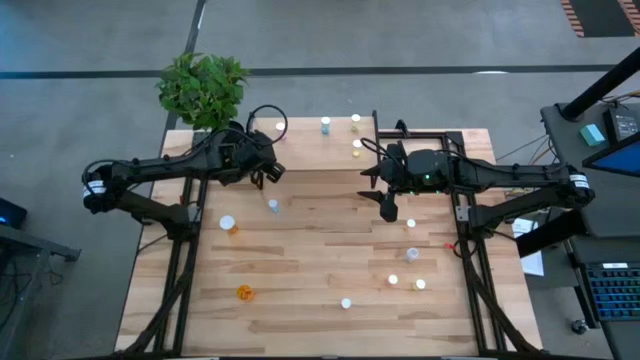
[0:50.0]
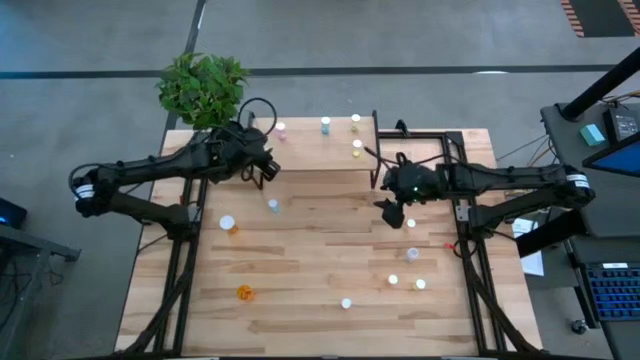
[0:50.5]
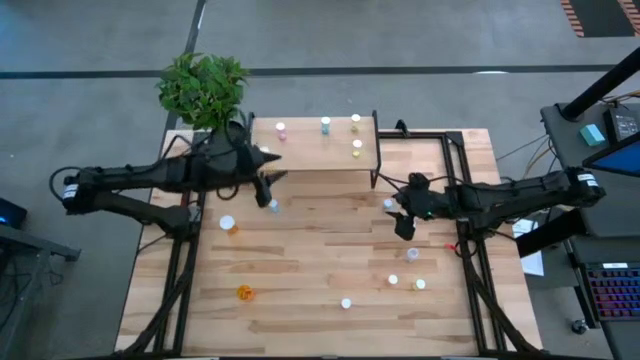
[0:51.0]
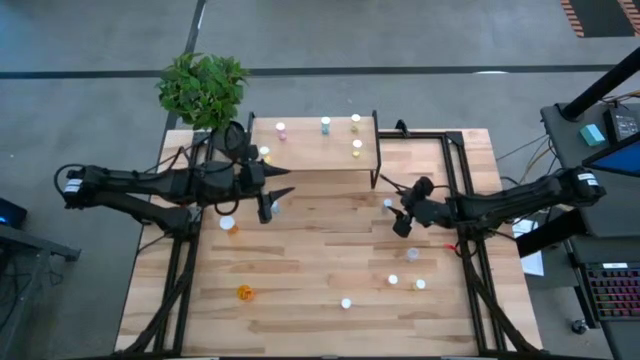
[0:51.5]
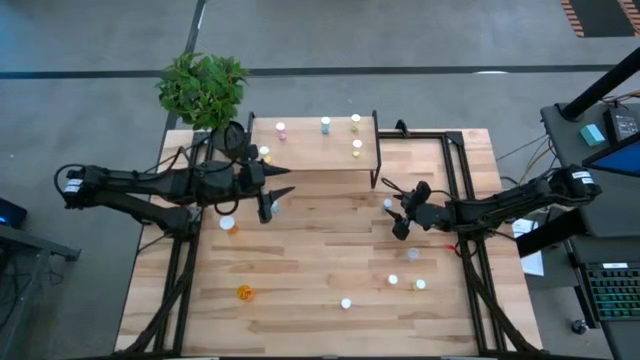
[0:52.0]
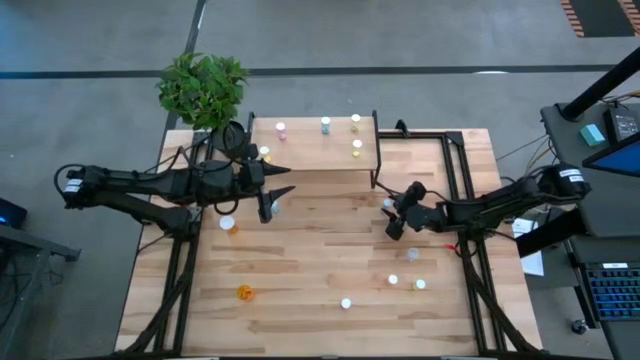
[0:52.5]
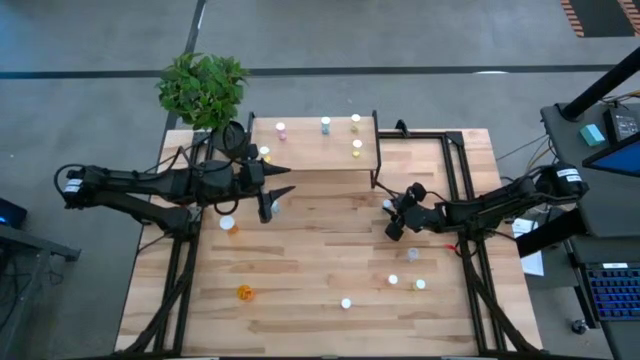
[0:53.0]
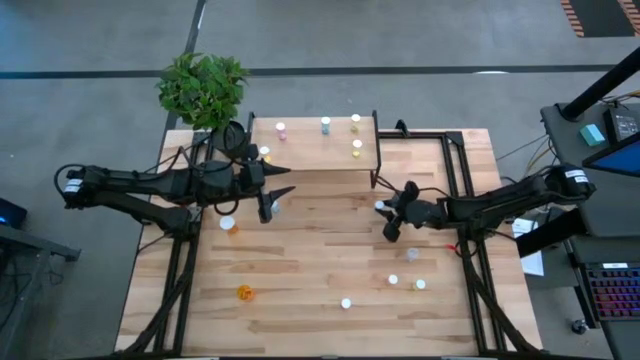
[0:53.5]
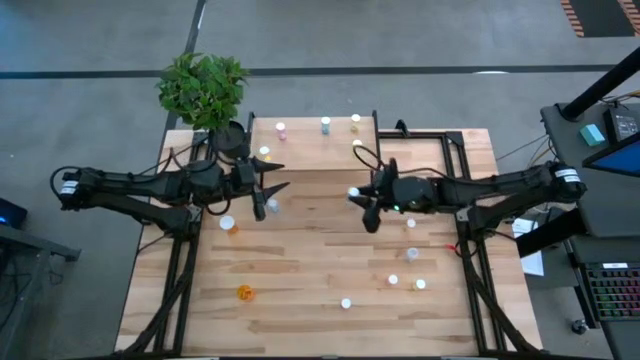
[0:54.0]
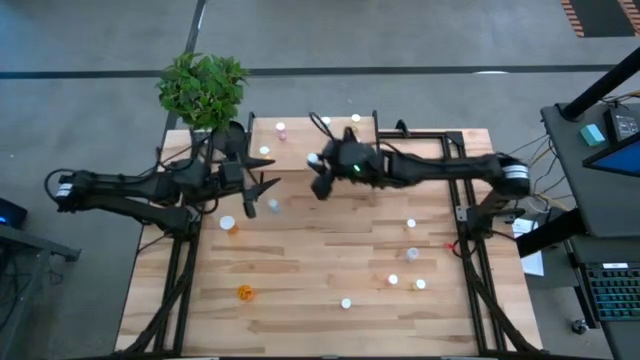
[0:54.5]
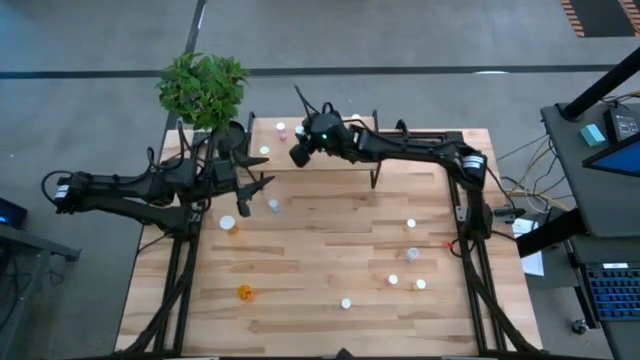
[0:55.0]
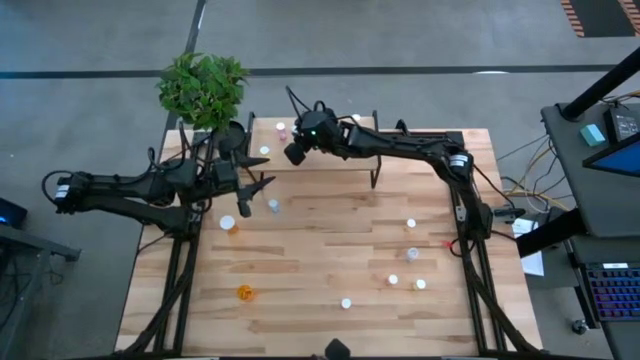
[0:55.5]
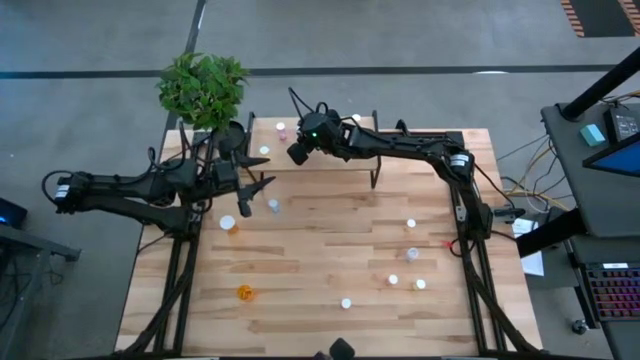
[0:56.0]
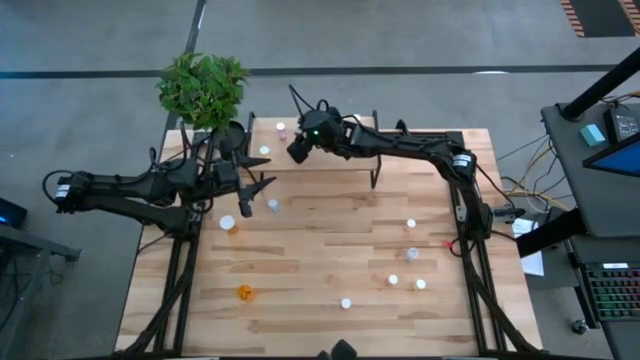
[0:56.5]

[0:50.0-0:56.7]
Task: Pick and place medicine bottles onto shelf by color
Put the blue pill bottle on the shelf

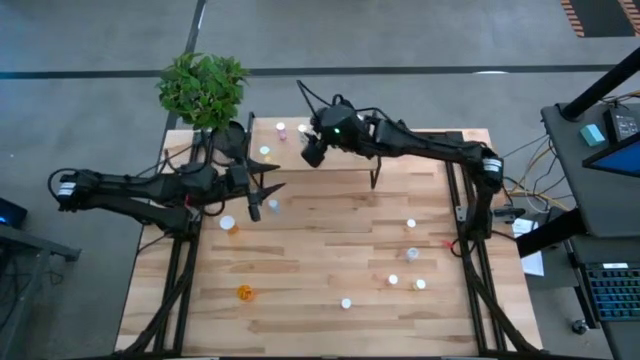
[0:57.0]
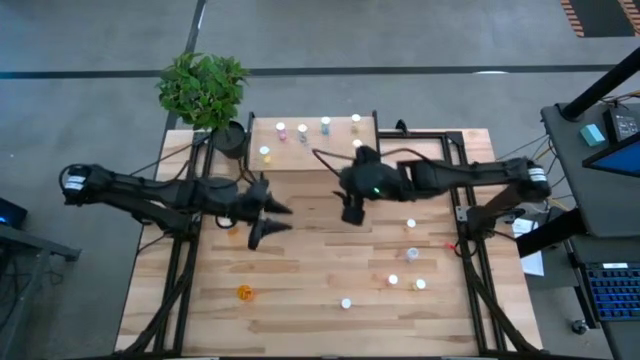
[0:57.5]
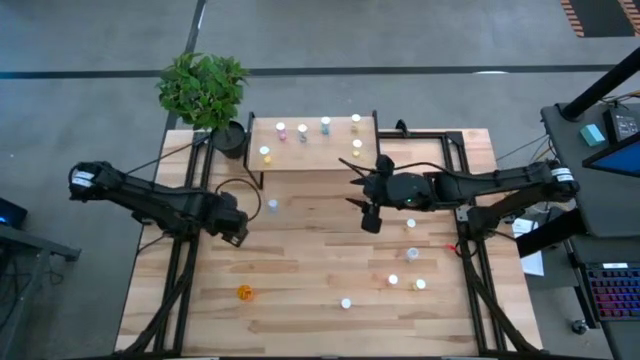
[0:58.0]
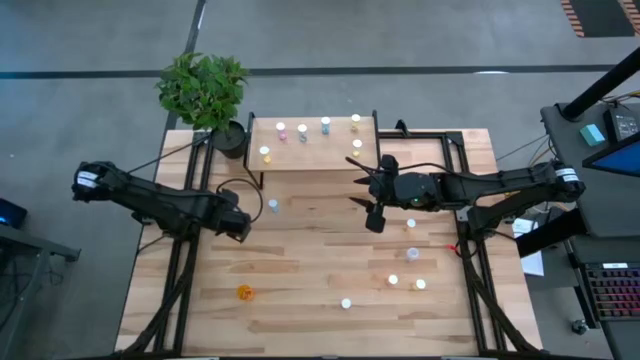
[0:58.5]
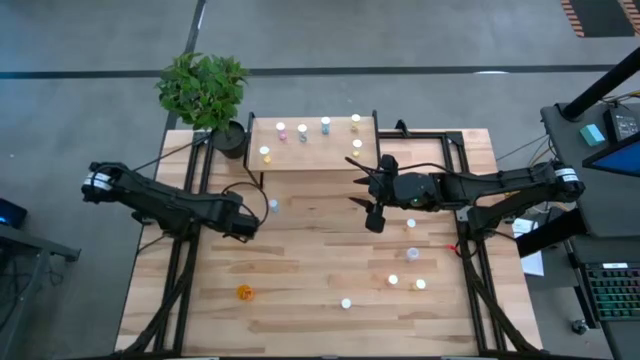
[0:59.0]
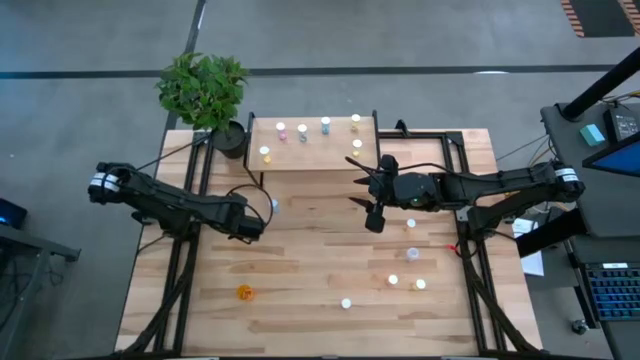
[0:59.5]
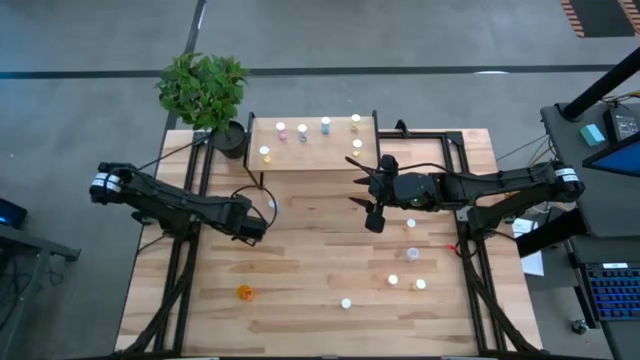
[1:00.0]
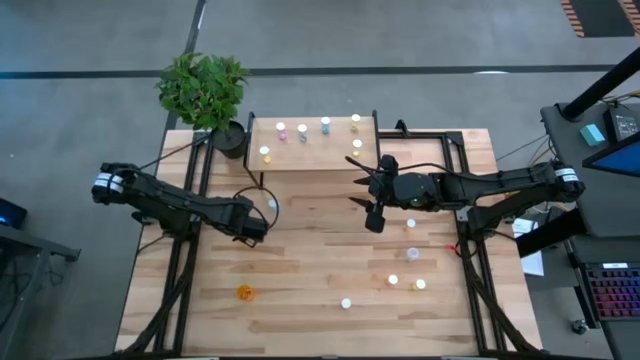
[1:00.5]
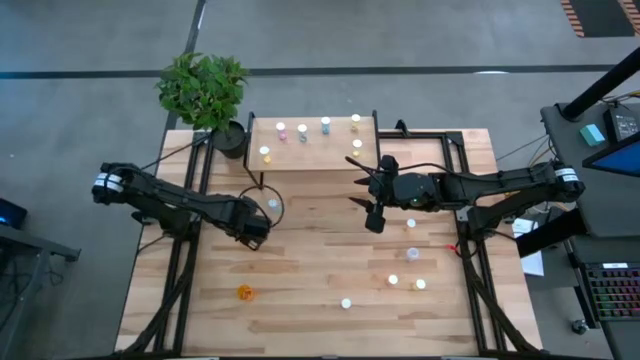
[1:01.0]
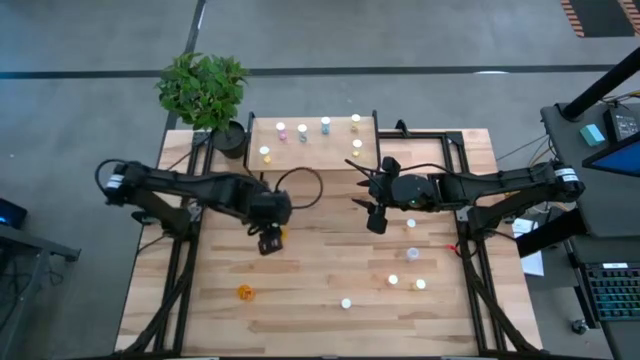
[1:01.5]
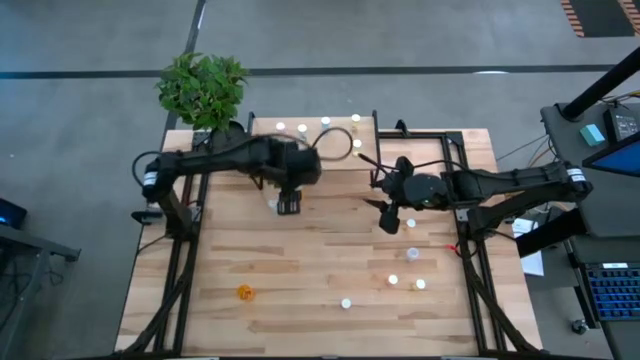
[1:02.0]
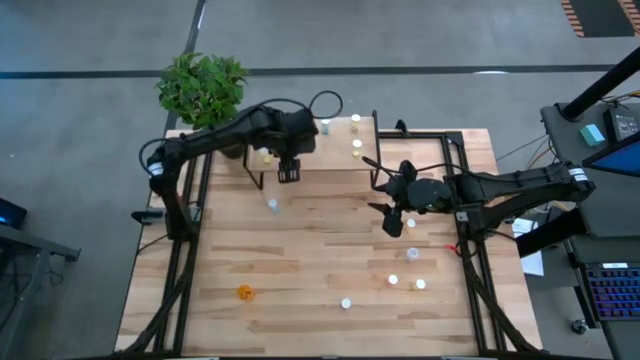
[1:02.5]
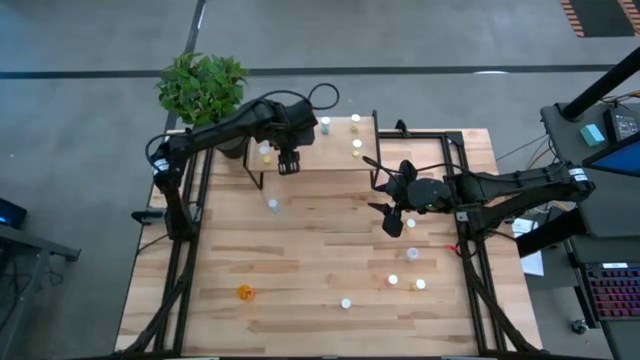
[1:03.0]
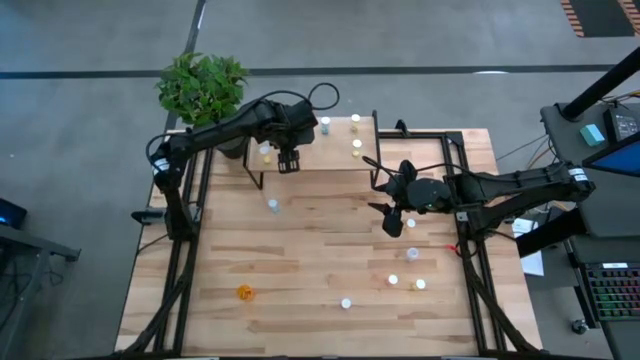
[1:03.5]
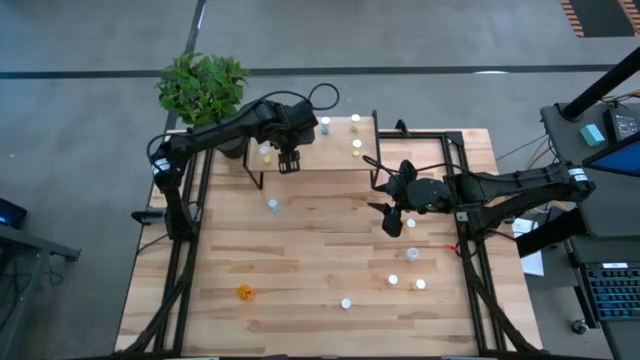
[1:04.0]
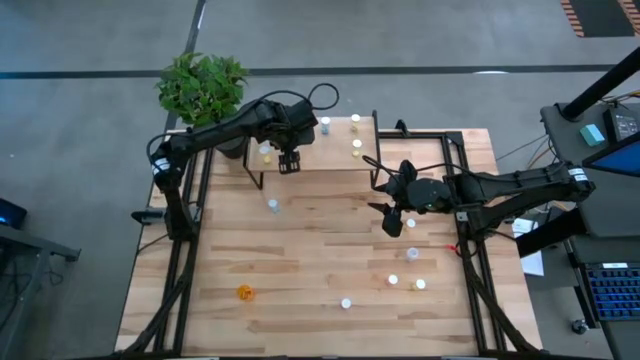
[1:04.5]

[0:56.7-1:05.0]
Put the orange pill bottle on the shelf

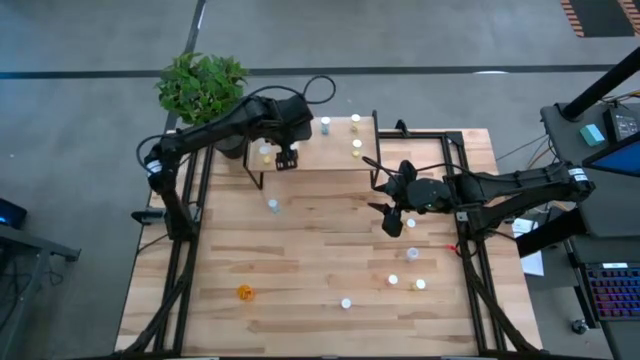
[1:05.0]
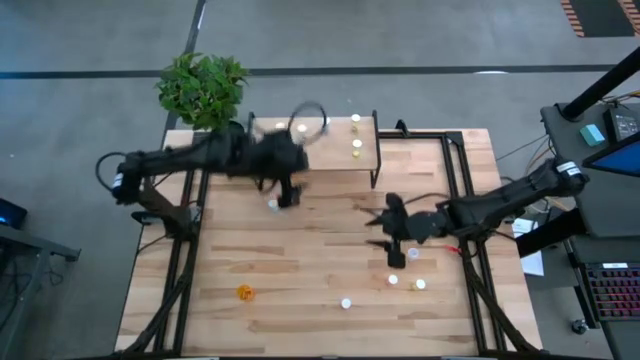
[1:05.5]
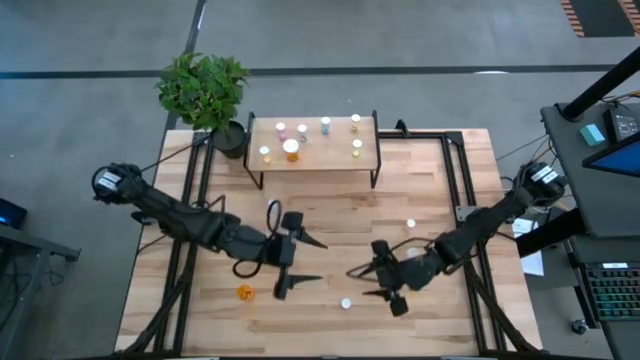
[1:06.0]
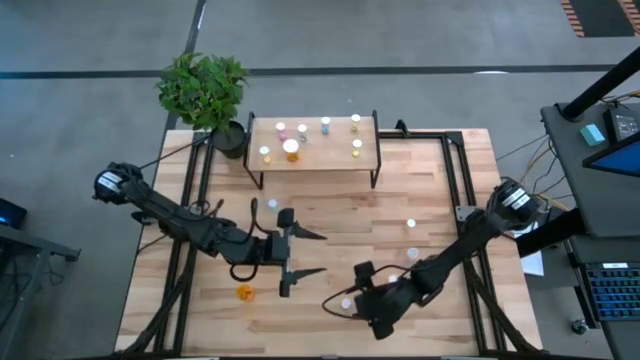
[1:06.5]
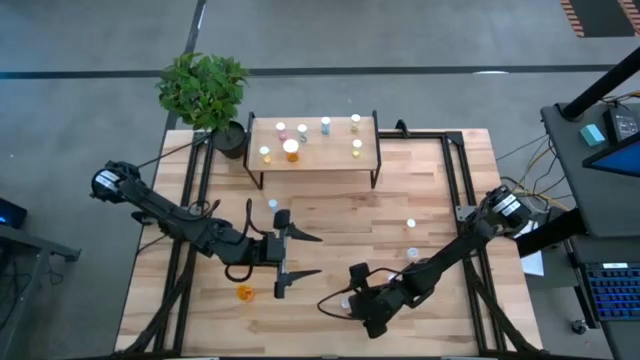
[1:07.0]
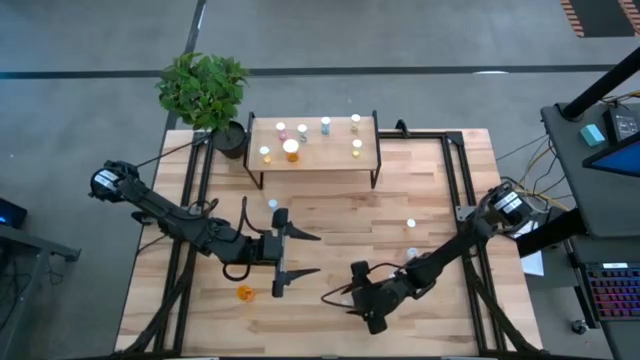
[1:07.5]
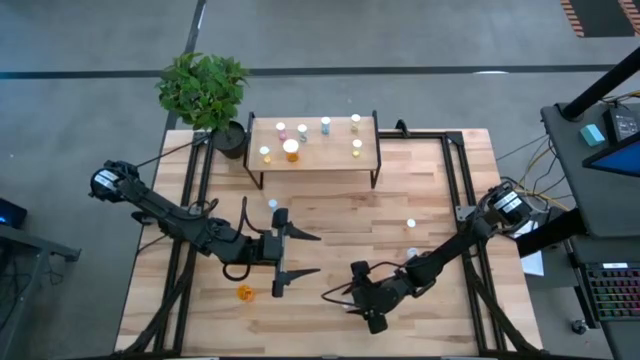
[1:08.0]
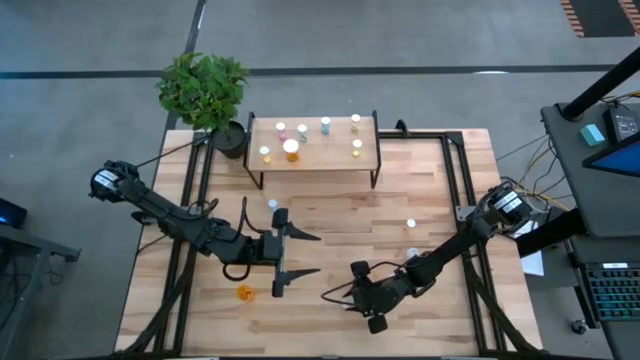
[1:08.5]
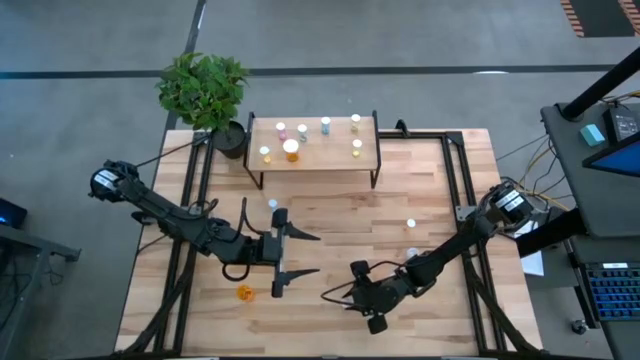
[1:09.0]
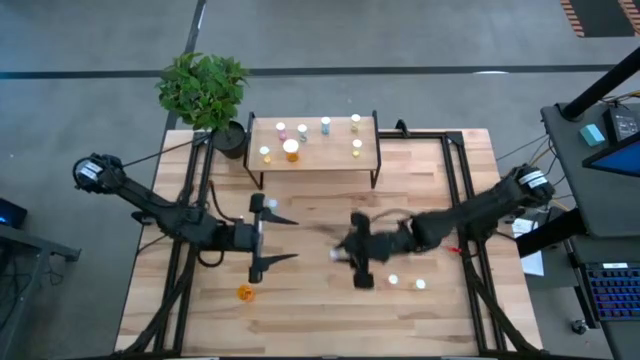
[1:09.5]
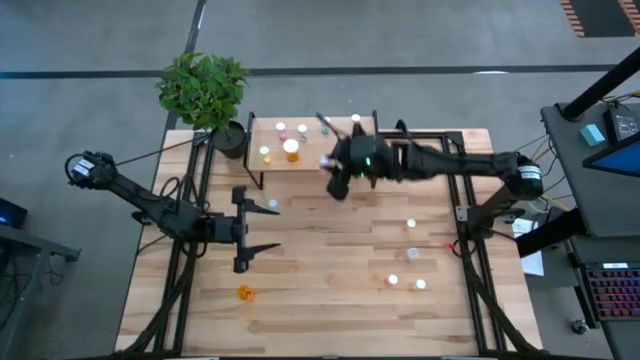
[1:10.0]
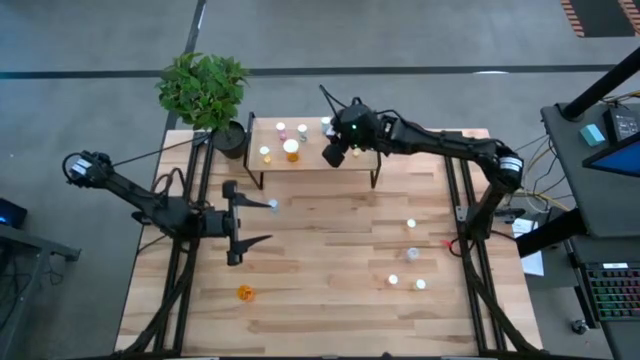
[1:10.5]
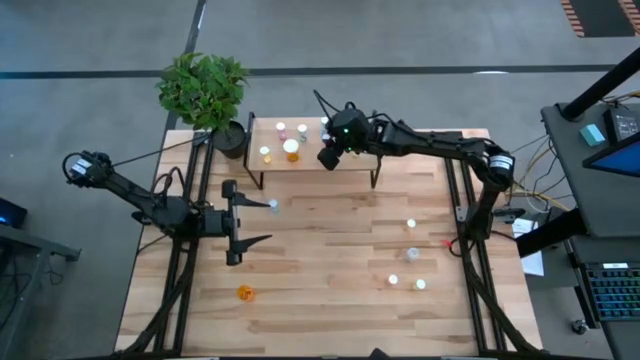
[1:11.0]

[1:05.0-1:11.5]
Put the pink pill bottle on the shelf
